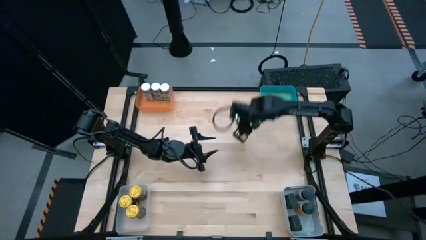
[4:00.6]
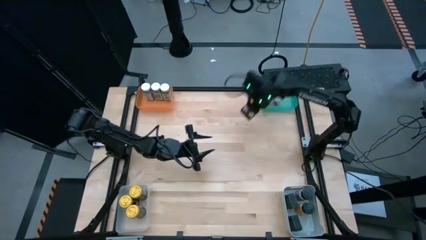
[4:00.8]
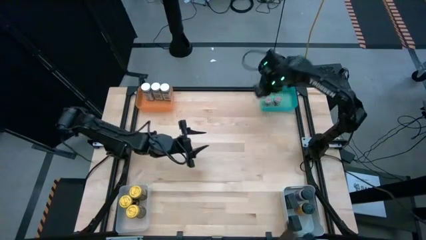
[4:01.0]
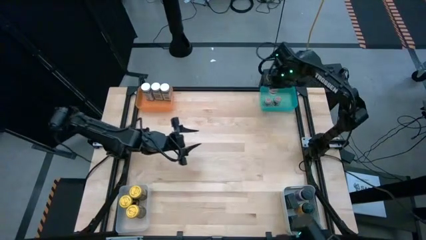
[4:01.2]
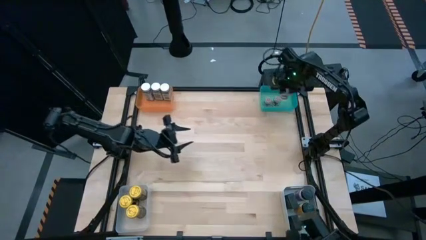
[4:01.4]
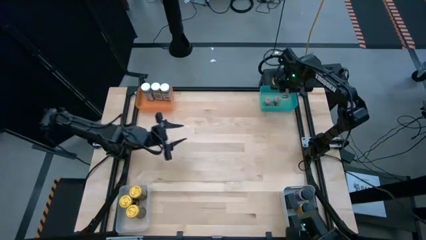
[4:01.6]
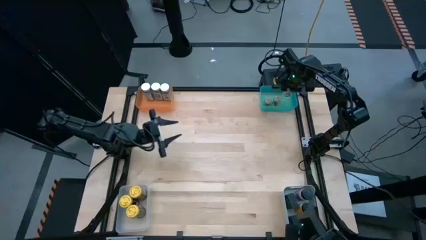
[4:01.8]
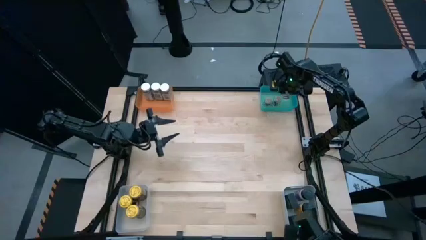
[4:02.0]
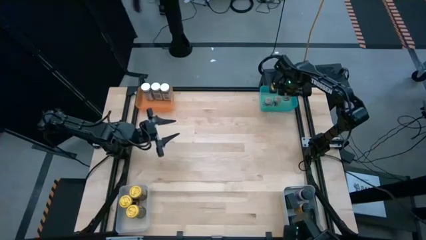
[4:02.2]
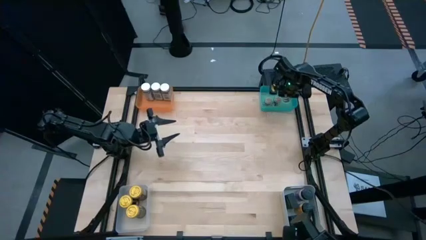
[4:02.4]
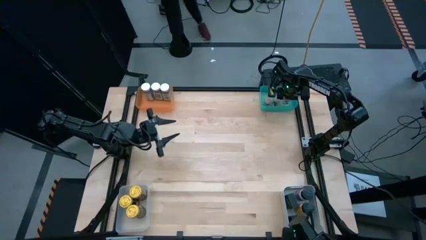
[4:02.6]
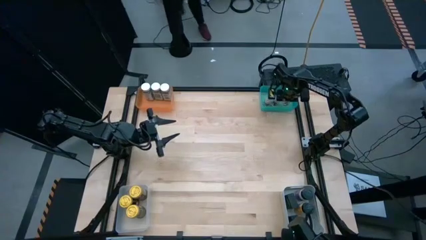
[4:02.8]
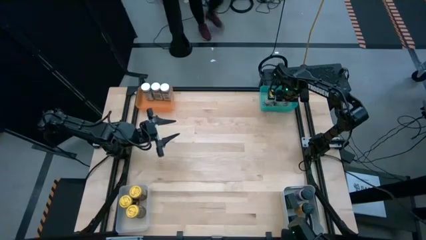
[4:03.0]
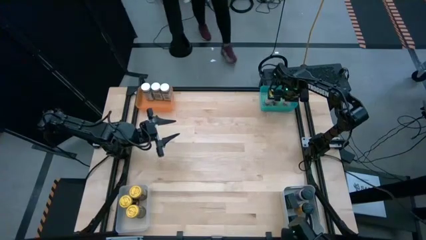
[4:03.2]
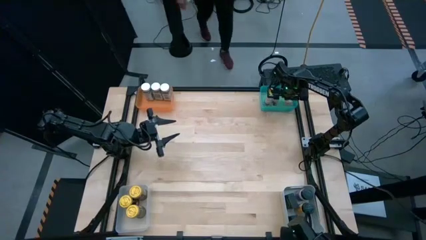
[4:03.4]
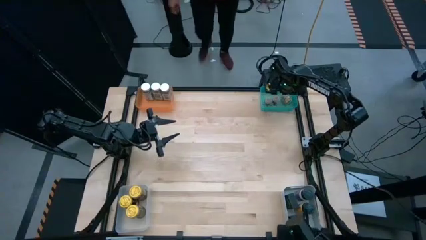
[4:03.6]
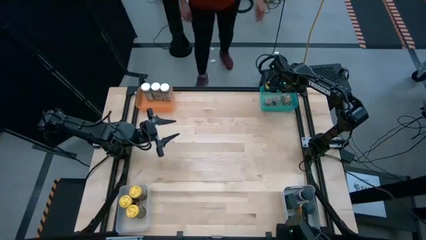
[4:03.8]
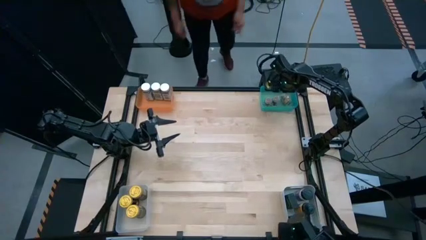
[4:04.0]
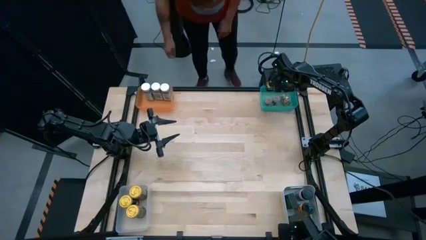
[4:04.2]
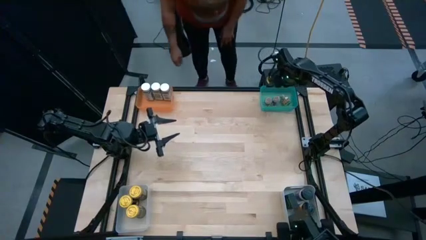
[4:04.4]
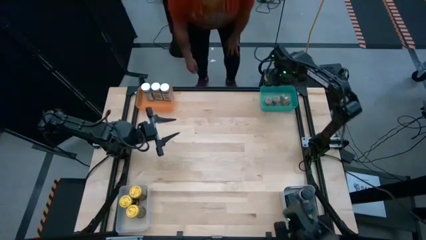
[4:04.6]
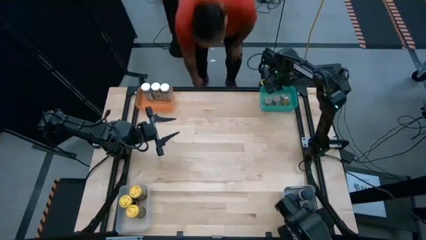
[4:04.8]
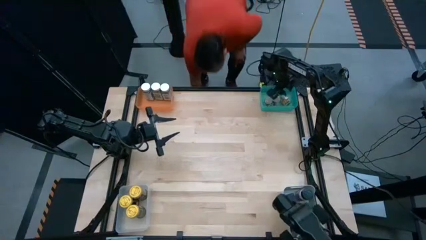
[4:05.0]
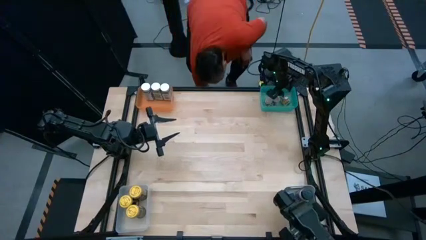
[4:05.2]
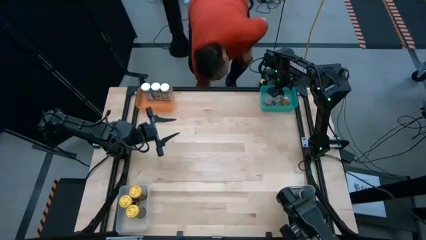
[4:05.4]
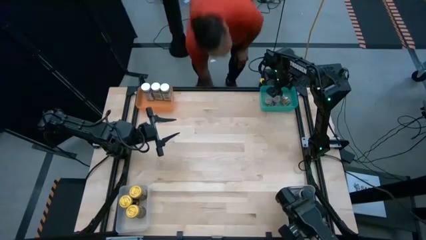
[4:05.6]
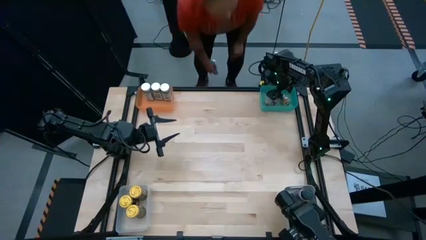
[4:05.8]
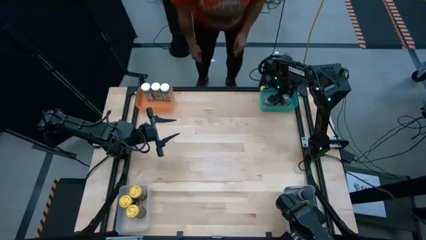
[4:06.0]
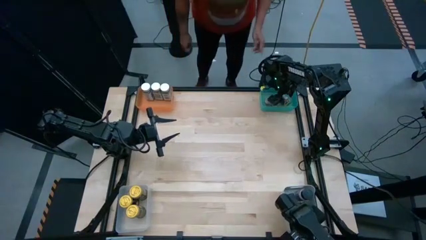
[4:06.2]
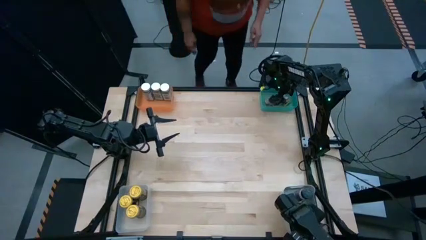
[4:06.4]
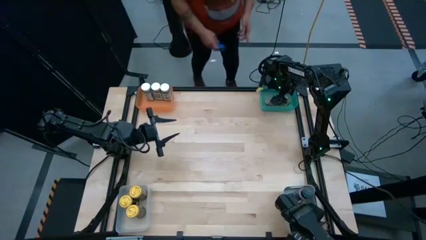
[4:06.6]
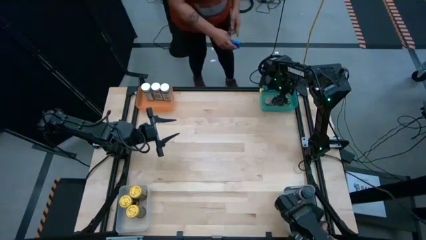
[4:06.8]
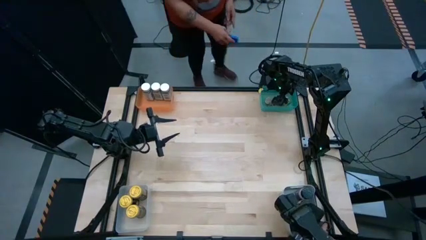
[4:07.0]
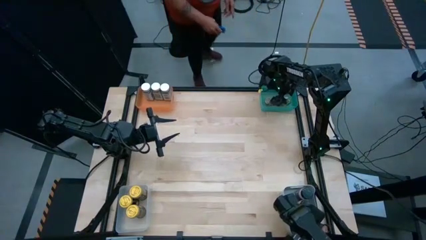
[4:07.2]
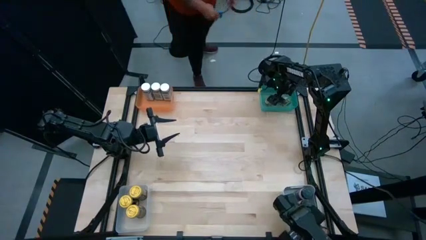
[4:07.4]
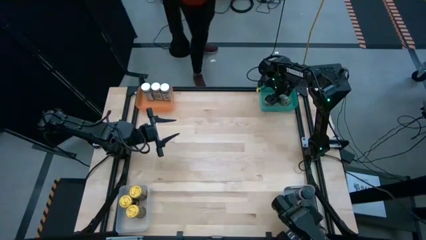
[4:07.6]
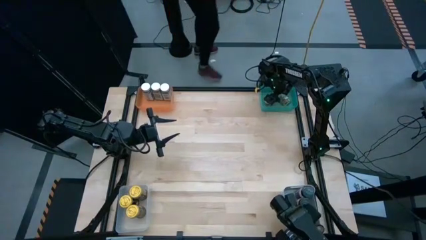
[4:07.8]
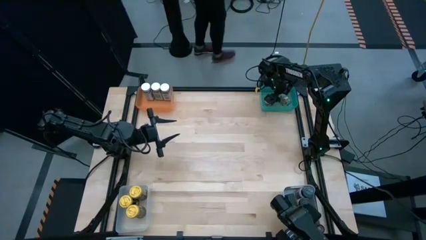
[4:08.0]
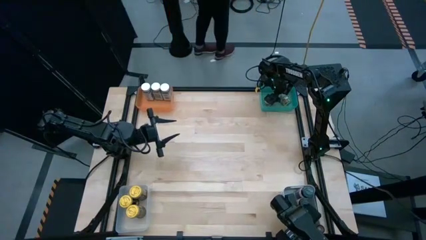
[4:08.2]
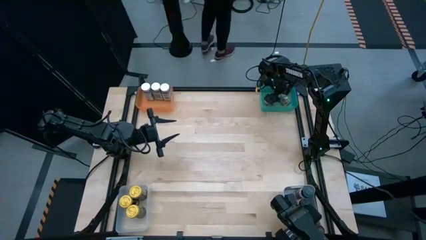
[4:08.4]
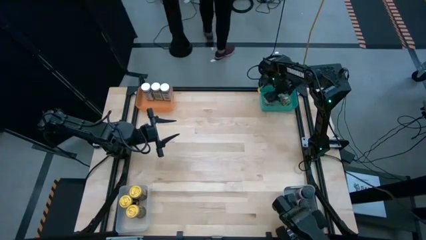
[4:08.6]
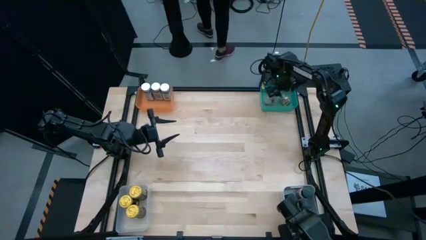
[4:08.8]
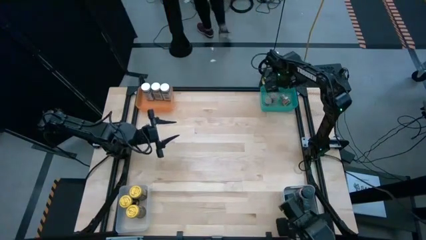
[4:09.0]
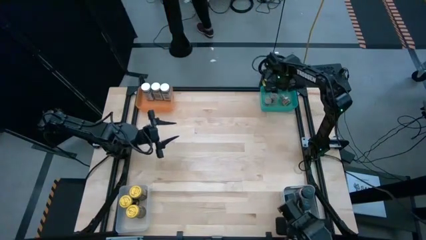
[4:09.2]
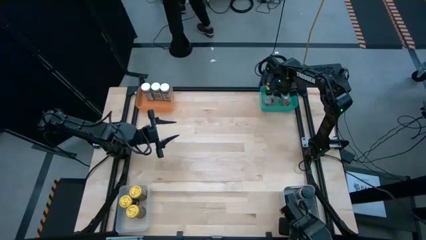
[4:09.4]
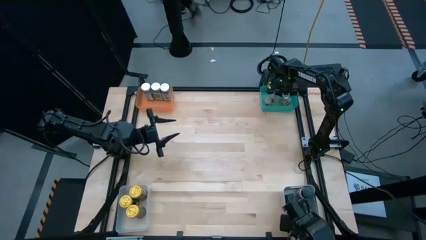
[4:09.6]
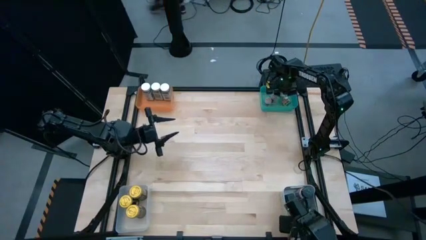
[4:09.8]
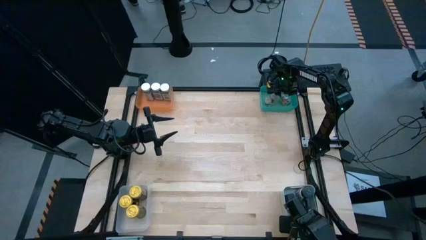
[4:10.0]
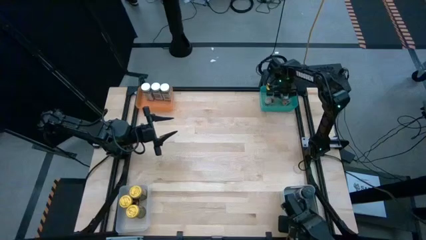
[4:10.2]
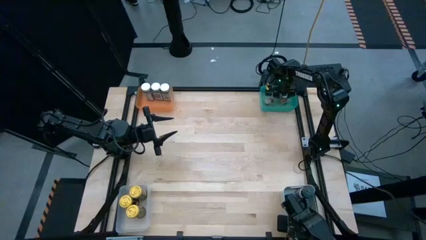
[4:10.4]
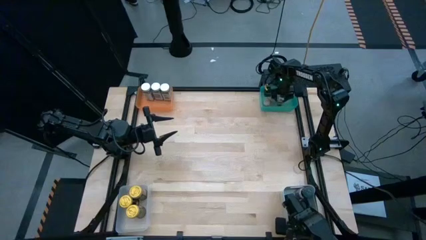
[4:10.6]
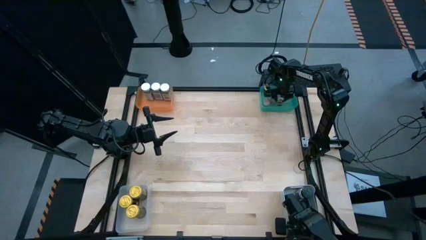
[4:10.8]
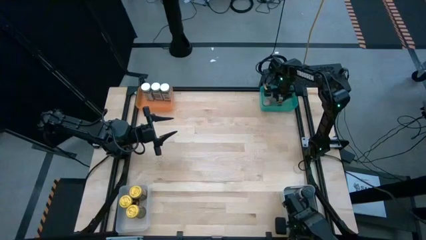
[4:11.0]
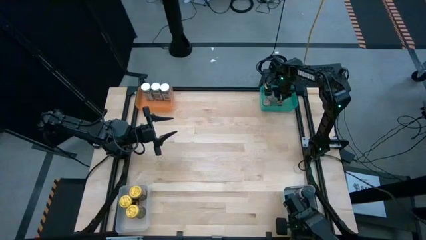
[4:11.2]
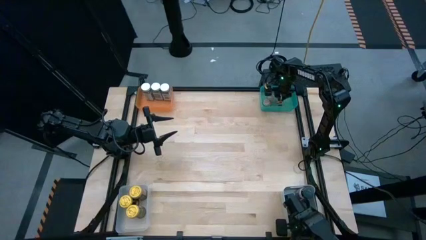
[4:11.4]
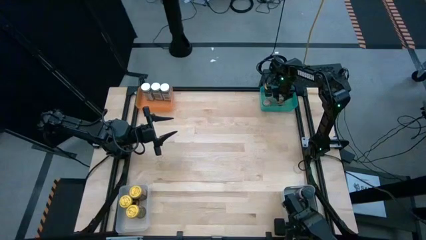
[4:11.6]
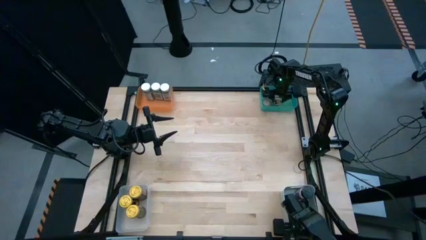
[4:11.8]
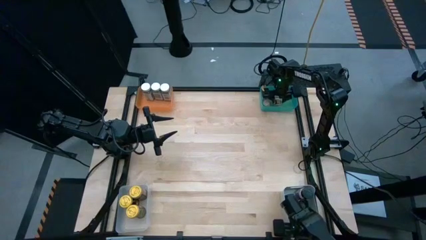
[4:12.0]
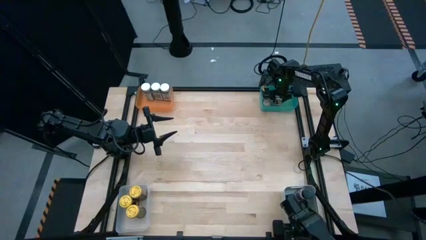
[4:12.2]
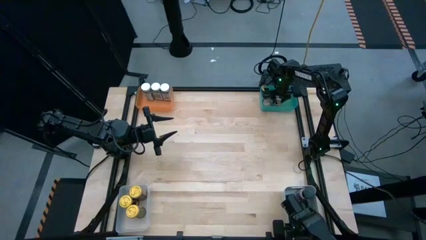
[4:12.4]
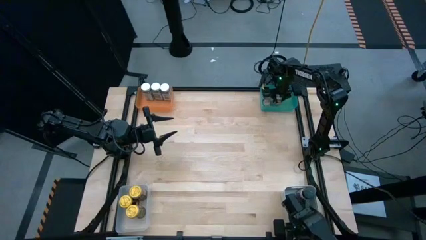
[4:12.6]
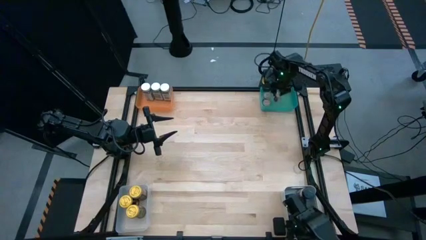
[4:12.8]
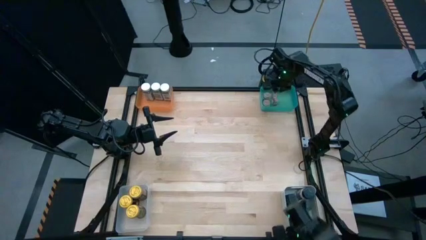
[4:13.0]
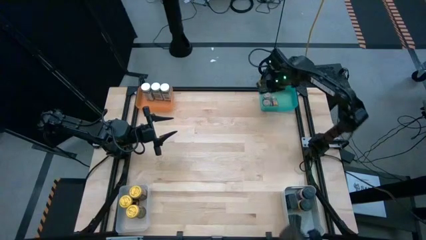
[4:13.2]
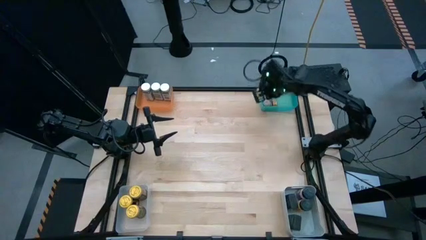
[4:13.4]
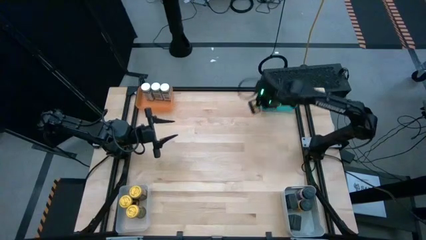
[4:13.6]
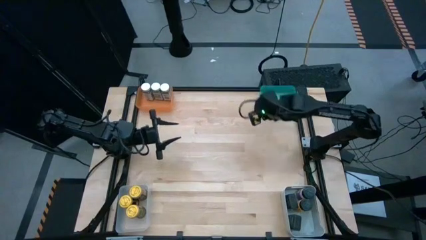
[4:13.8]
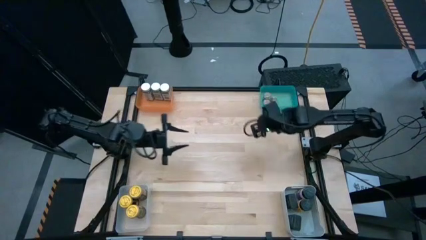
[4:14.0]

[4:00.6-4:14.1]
Task: Sort spices by type
Put the brown seasoning bottle into the blue bin

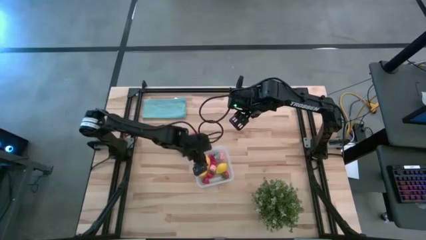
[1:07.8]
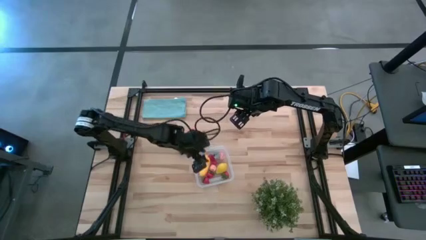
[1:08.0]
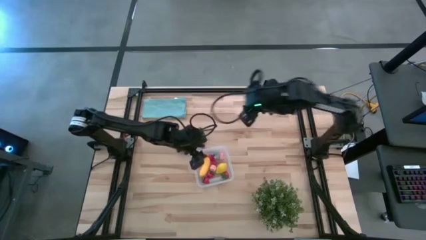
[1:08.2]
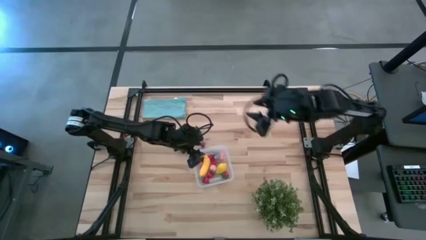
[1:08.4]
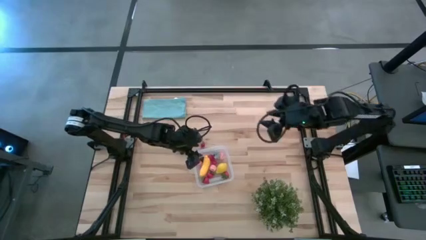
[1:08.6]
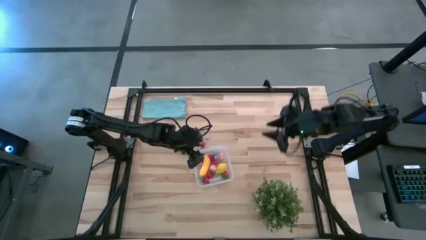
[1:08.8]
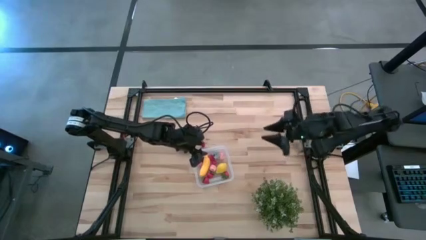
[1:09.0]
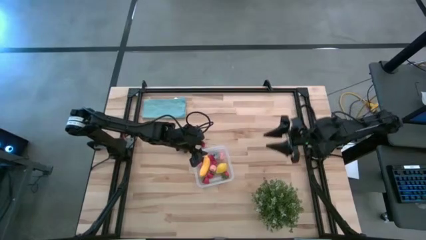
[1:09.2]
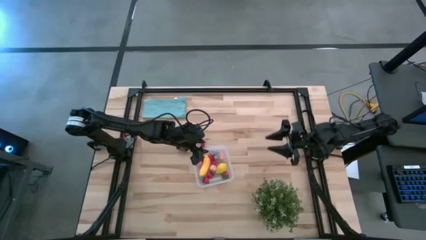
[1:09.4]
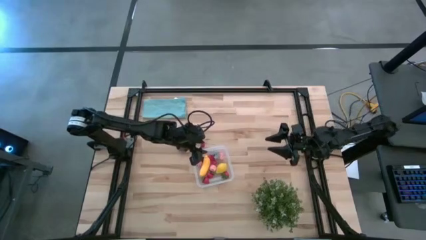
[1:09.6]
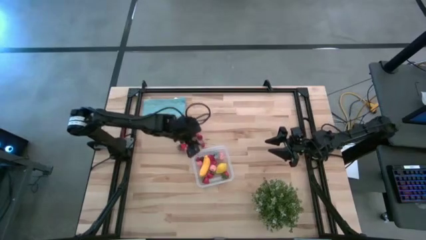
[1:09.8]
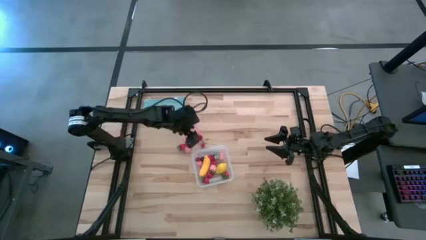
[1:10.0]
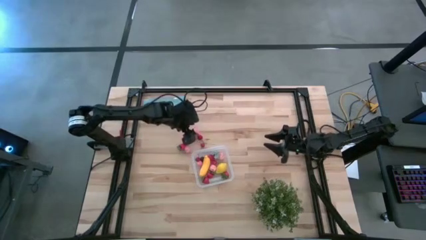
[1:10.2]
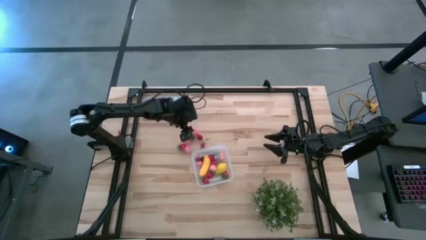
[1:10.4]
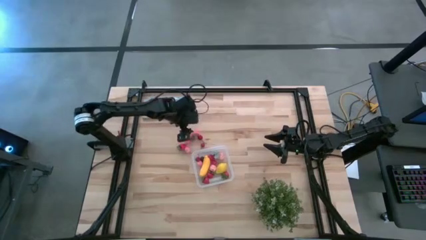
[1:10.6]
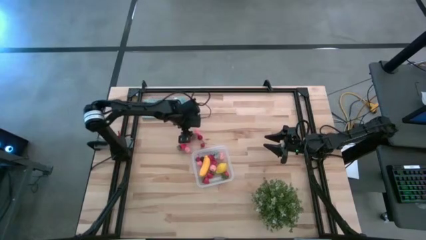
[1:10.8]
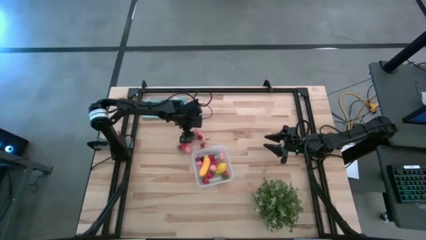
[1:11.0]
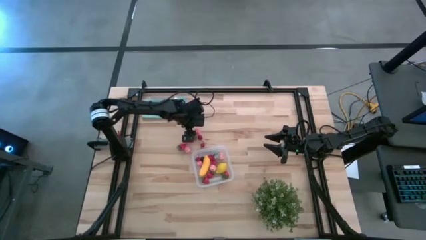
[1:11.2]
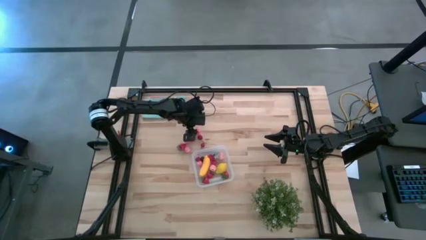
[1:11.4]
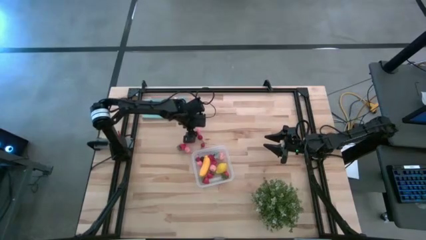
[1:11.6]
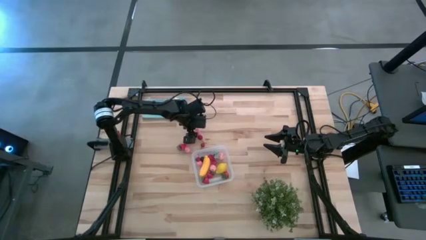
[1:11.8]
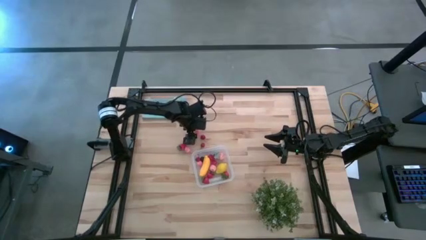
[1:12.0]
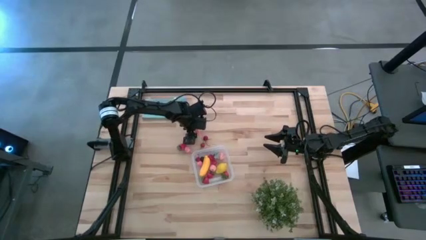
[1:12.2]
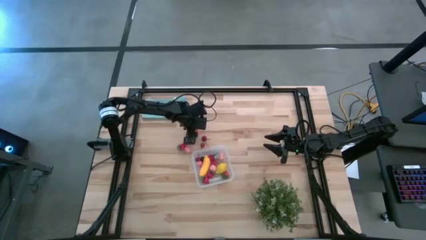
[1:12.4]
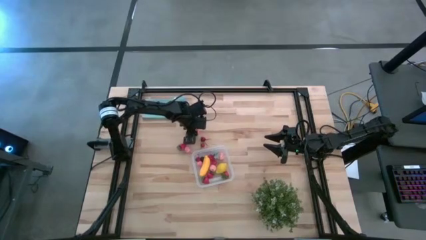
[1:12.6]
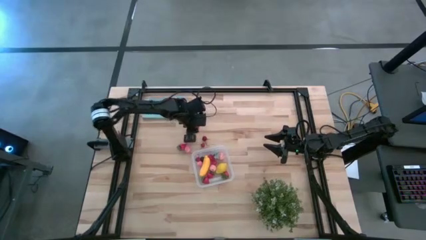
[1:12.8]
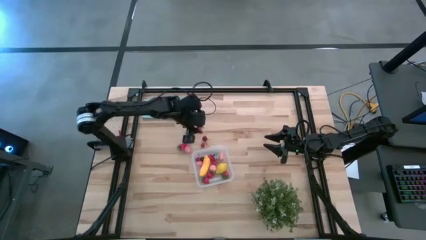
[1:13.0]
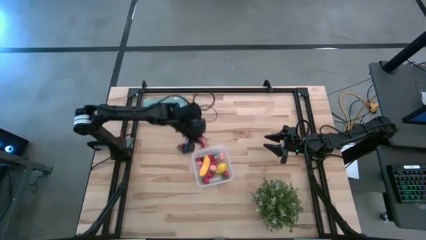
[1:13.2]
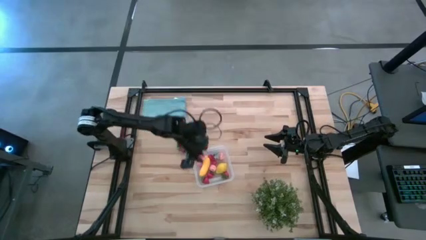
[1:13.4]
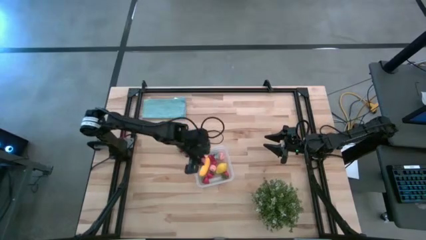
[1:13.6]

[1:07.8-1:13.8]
Task: Pick and placing Produce into tupperware
Put the pink peach into the transparent bin
